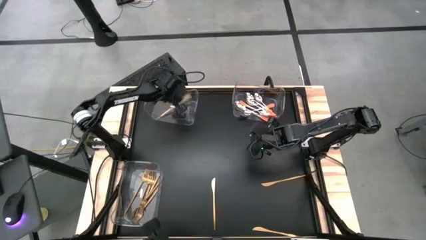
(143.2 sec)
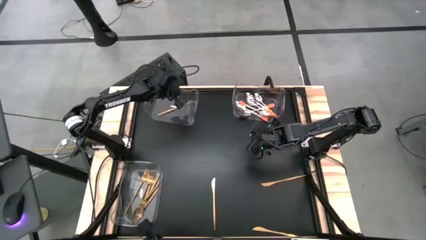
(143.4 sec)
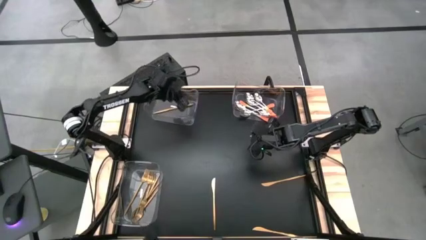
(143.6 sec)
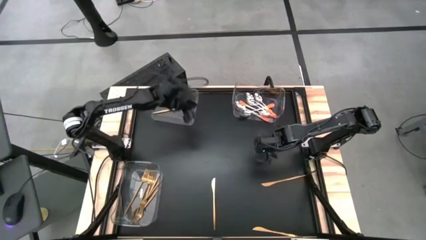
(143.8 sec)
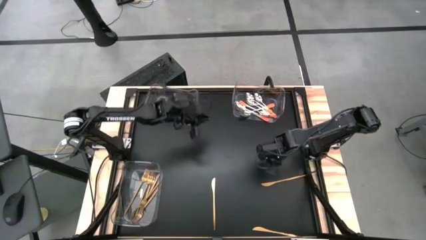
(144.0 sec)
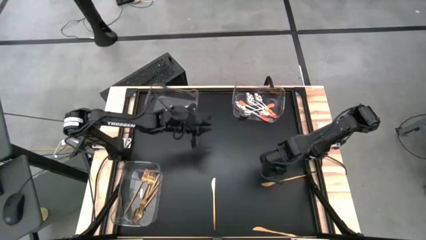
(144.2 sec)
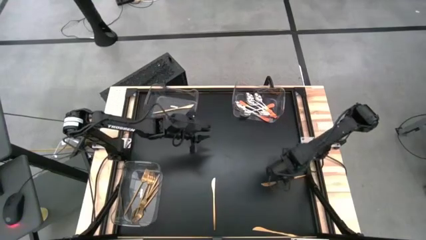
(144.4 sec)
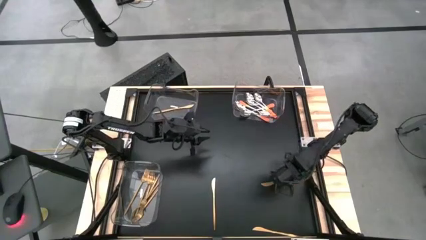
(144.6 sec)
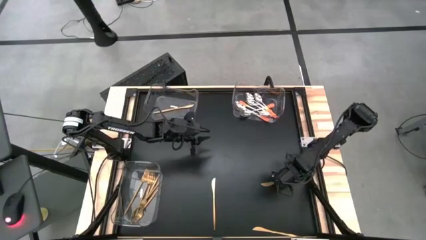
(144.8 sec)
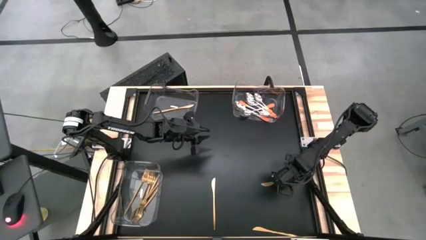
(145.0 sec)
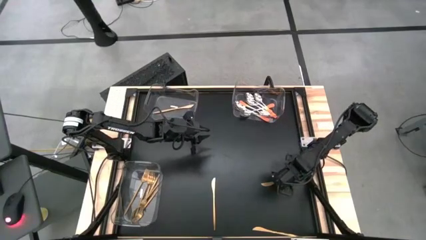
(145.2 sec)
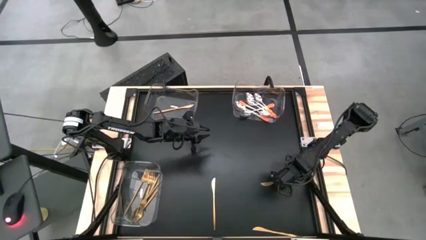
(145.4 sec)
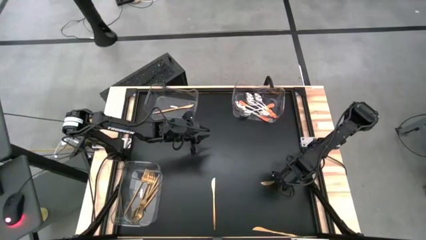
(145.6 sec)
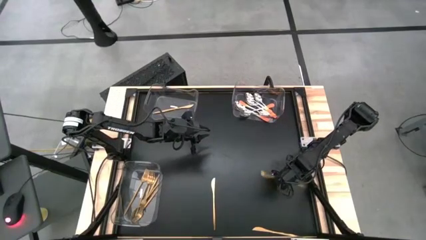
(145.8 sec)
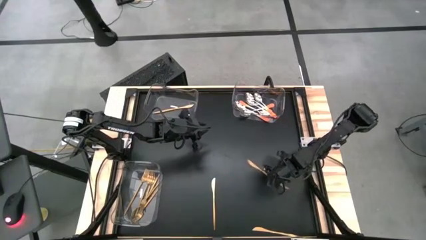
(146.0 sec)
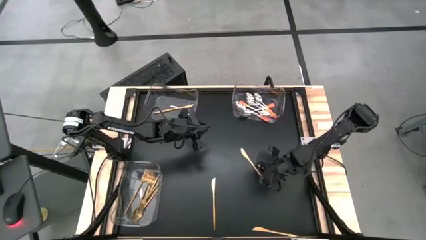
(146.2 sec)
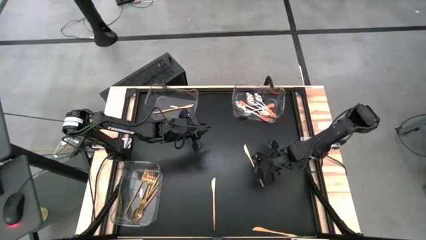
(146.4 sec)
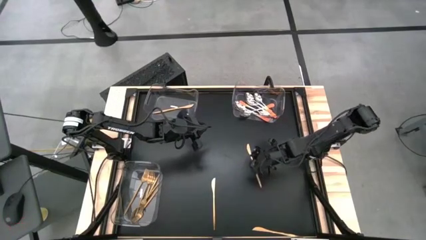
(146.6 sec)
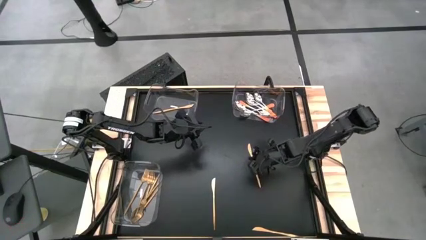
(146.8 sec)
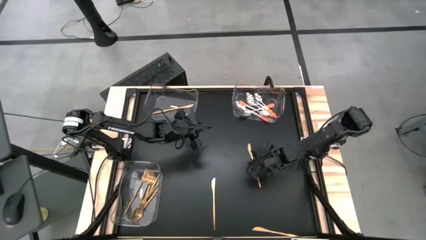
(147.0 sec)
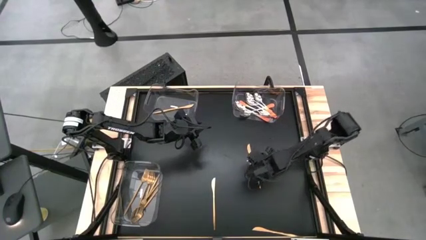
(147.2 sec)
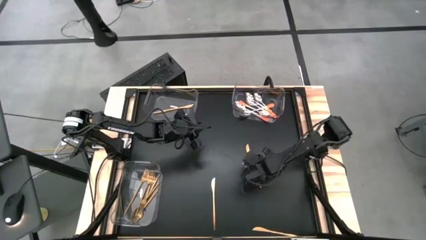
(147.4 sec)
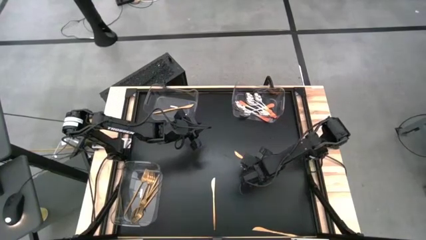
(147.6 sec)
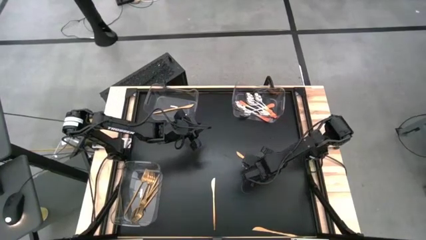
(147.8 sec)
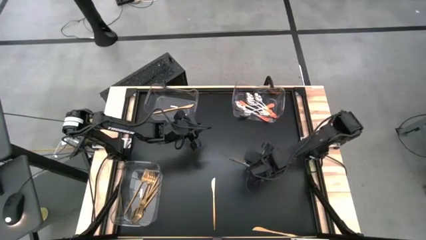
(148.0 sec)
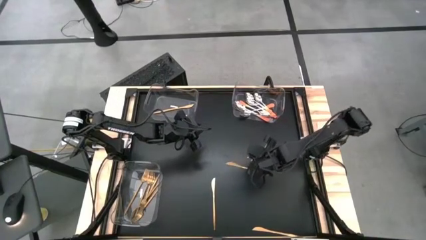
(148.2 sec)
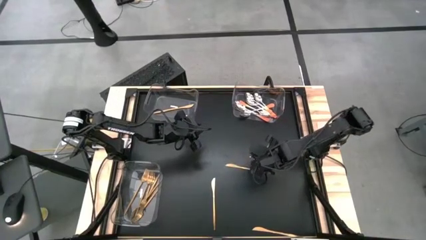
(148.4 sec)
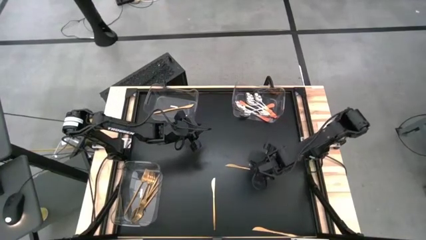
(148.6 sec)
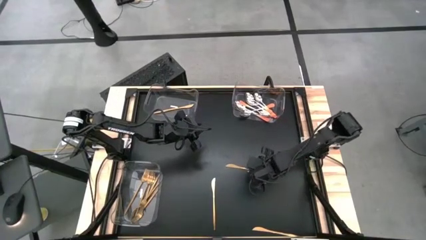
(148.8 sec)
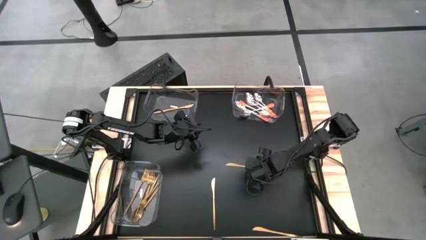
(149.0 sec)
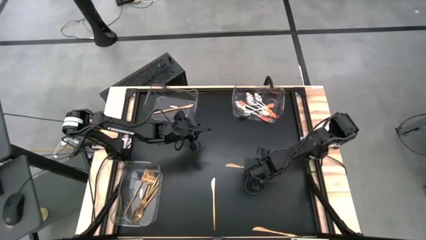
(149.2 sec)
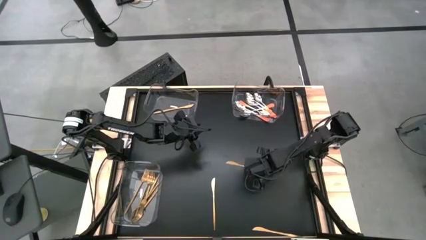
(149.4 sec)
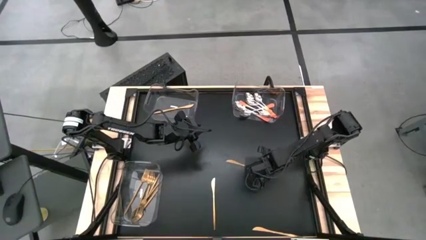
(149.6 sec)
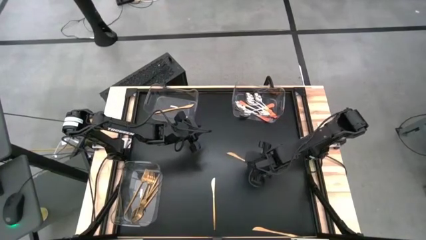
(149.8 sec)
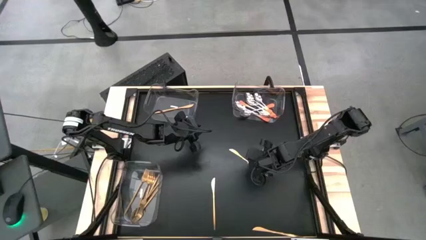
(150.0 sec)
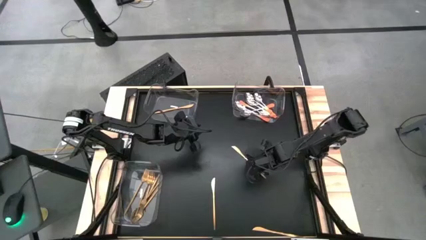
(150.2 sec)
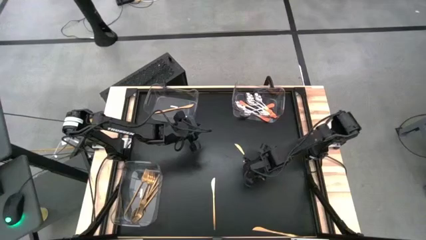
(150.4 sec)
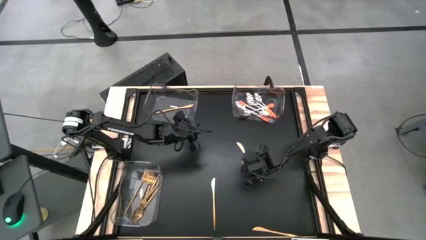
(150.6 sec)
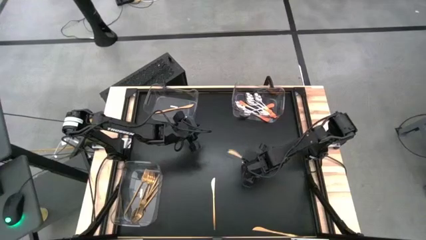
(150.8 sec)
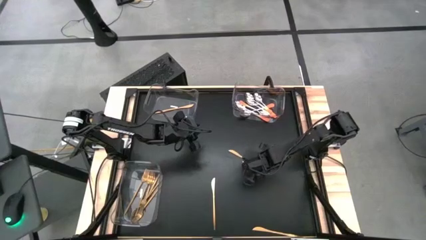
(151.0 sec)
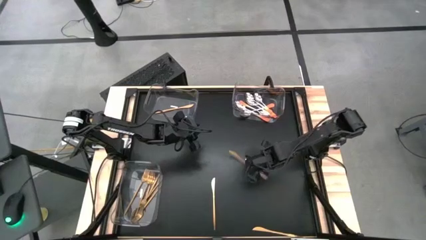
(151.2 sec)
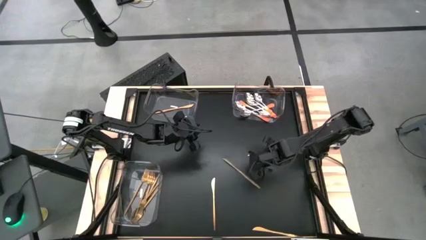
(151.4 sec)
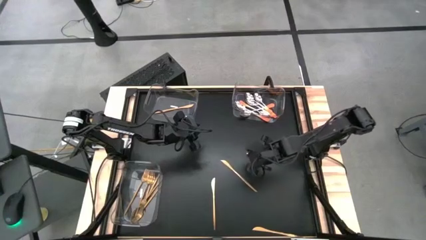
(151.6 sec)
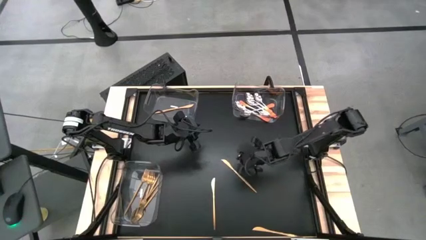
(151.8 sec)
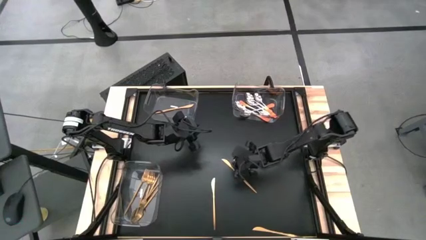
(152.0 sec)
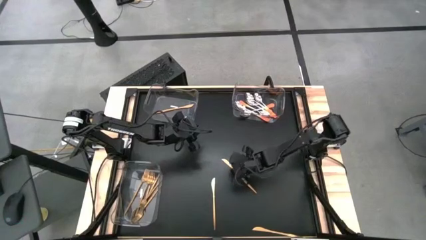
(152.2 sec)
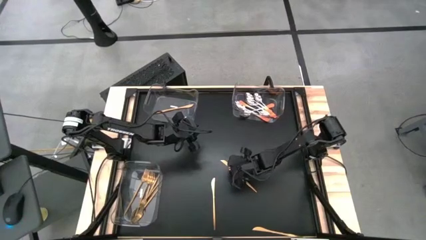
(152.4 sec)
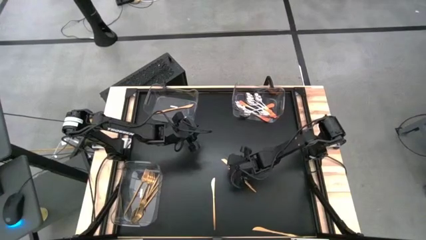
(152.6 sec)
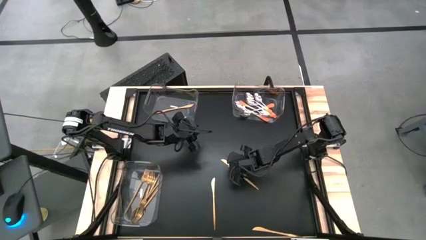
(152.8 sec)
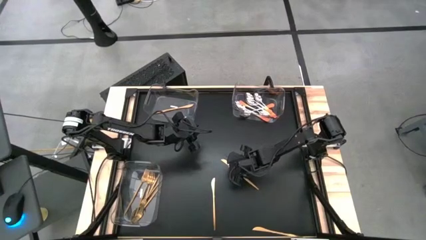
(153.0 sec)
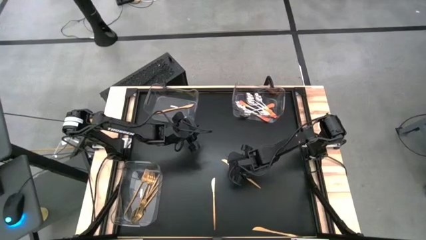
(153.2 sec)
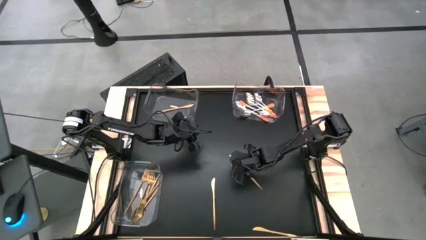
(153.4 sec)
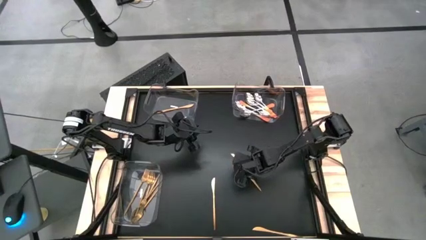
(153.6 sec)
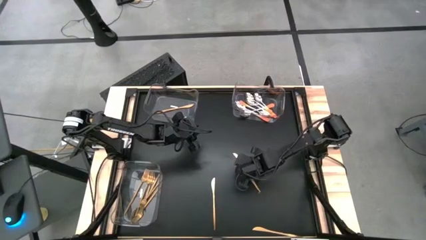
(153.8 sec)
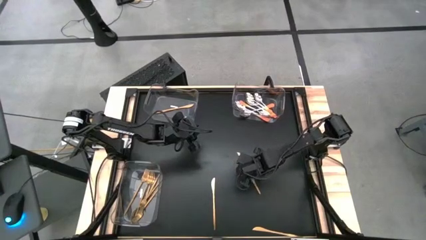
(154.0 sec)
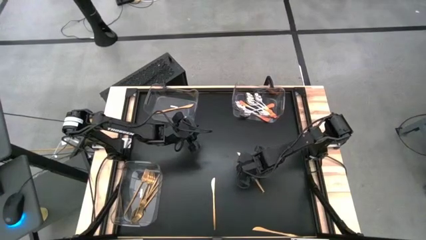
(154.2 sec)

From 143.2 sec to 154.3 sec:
Task: Sort silverware by color (type)
Put the gold table knife into the top left transparent bin
